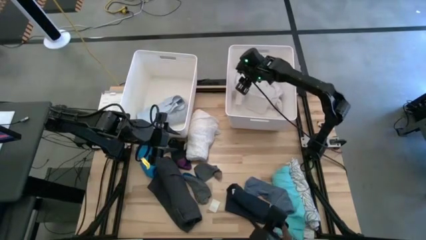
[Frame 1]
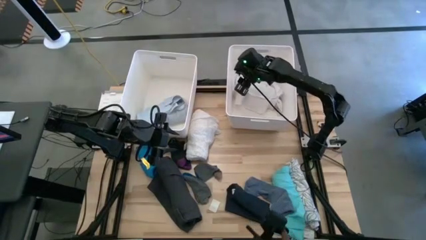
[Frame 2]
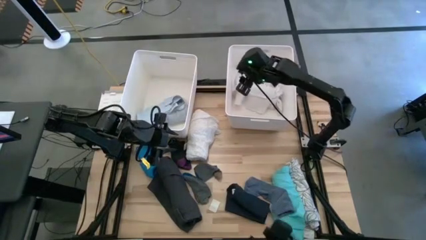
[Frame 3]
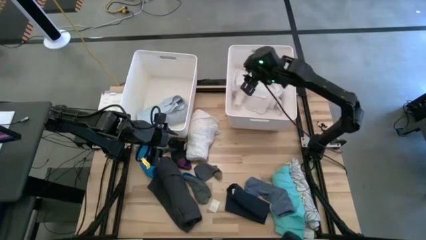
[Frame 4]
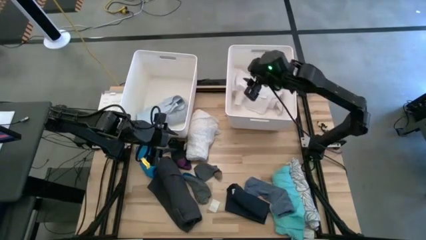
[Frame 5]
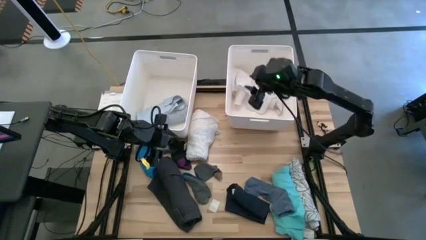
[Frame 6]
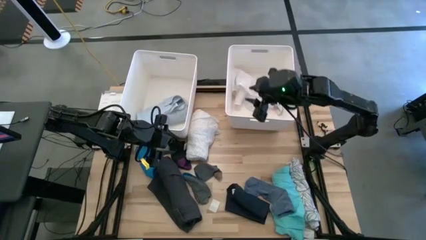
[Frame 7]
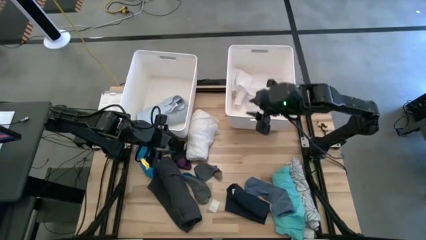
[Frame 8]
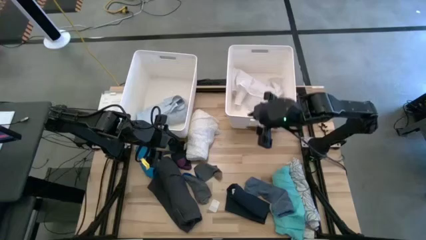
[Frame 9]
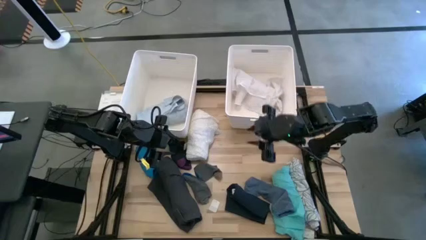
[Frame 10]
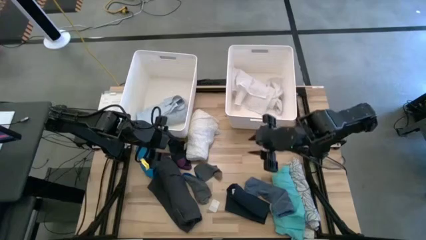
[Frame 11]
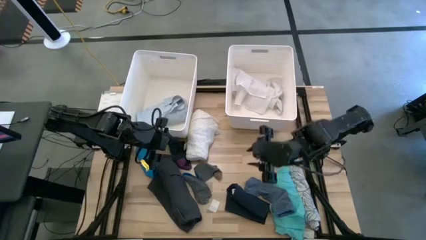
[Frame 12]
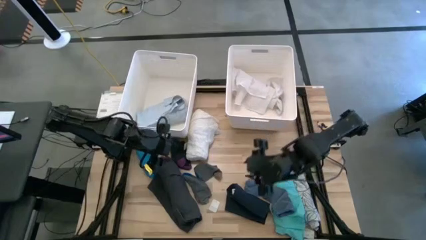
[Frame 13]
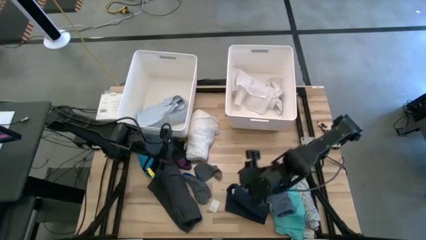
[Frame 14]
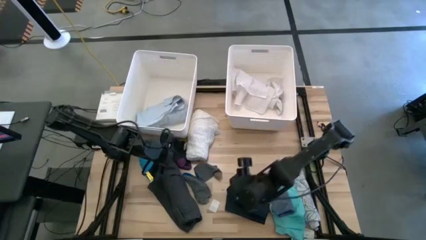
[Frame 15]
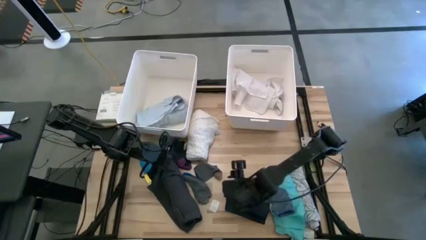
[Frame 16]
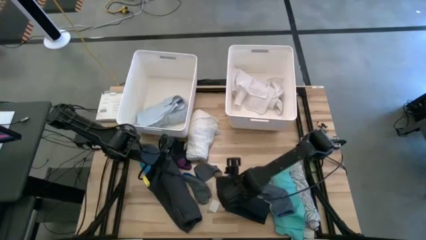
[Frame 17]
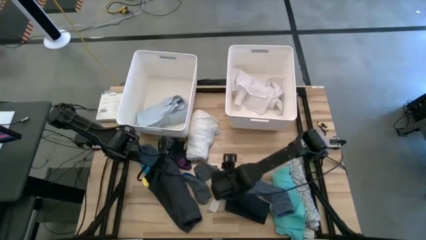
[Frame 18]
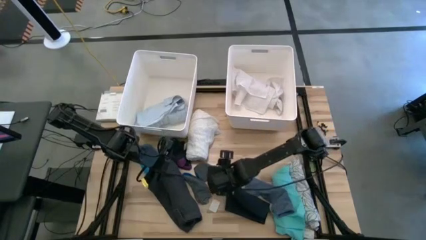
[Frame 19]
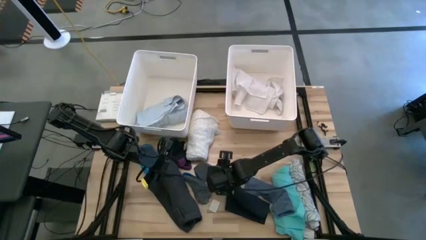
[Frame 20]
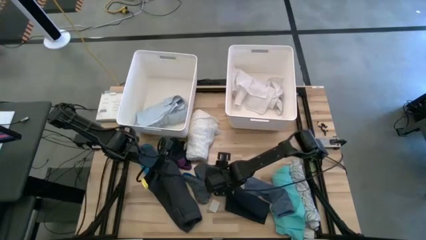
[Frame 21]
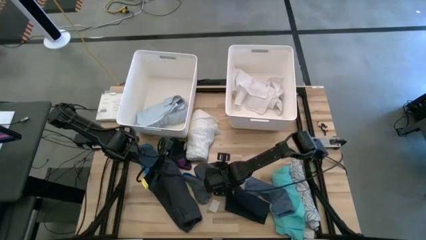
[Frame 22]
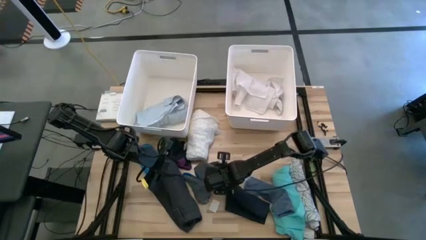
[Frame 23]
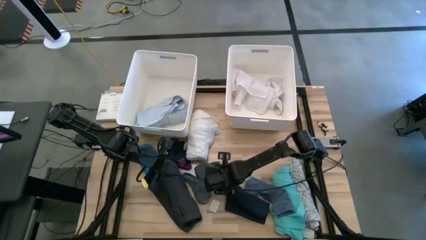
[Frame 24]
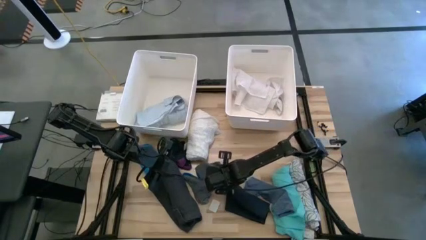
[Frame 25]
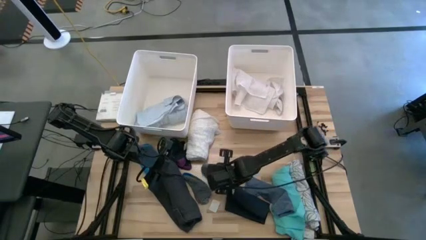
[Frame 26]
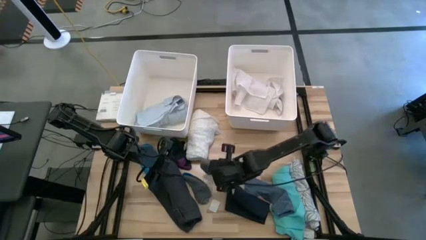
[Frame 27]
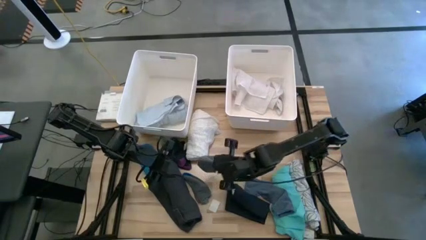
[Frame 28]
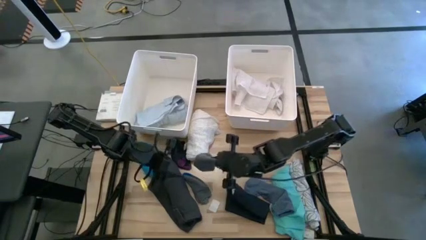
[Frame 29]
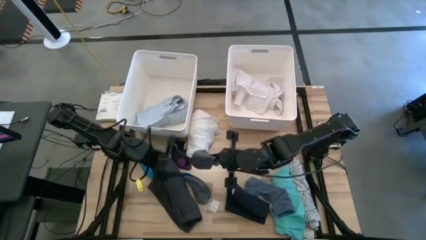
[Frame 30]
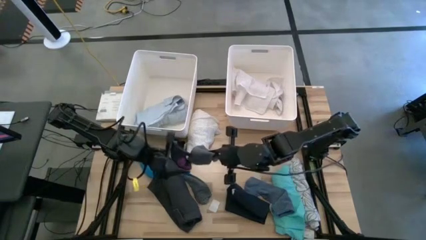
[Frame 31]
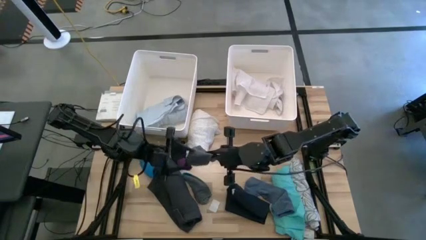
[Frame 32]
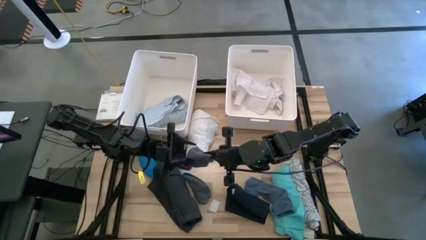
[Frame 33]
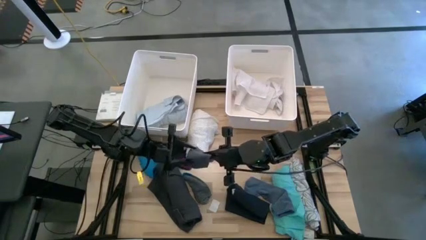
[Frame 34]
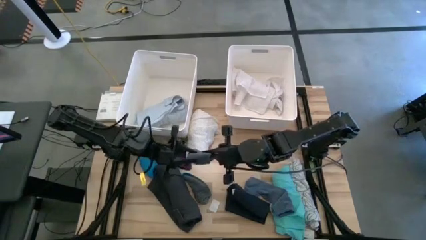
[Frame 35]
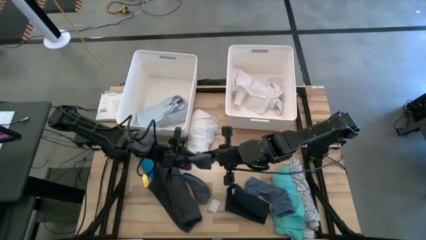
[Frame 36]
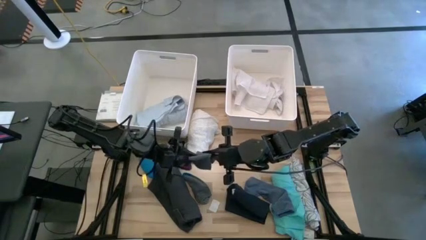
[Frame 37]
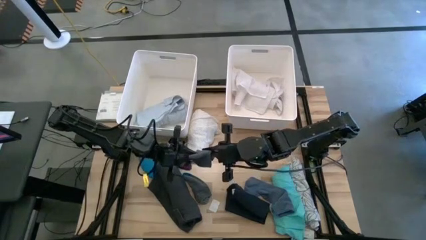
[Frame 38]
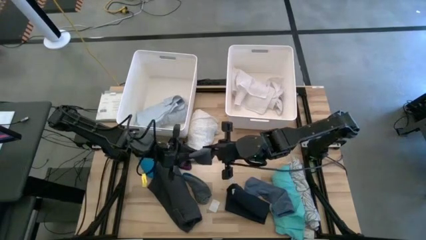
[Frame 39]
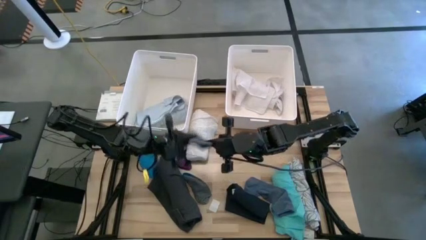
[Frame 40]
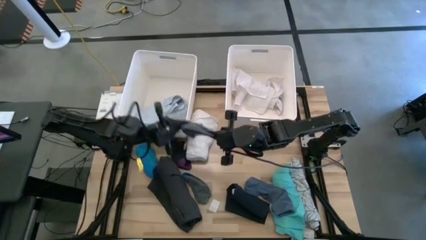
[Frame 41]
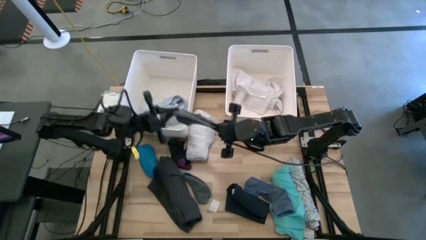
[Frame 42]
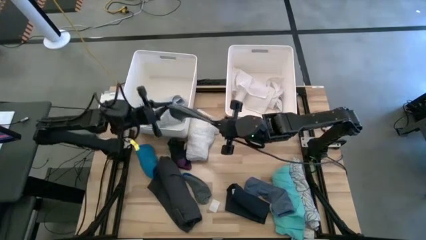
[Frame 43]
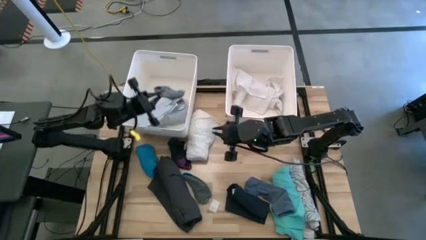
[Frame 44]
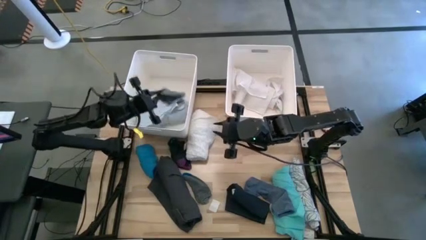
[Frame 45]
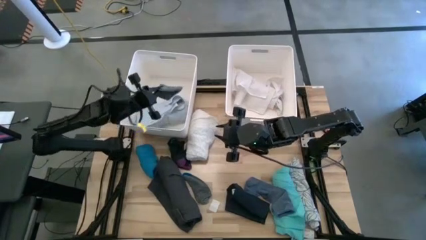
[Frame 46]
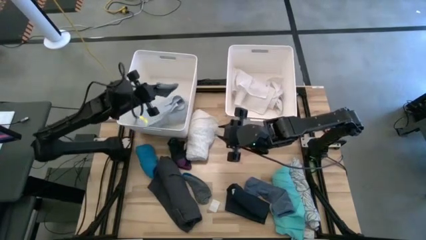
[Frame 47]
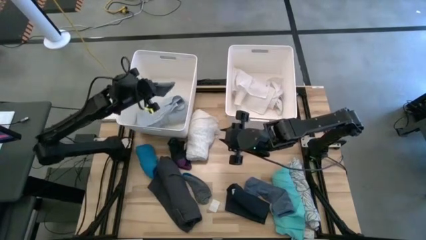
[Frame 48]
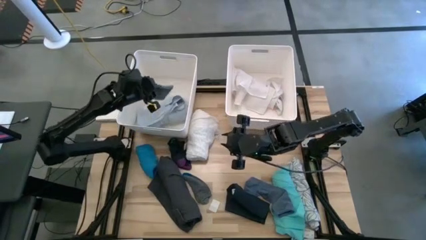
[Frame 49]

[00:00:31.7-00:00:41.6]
Task: Sort clothes
Put the top gray sock into the left white bin
